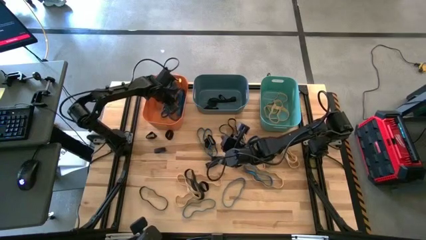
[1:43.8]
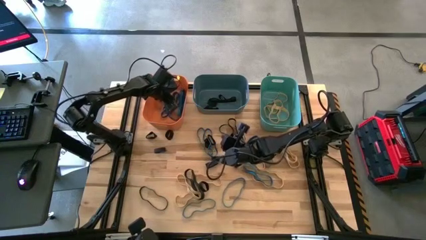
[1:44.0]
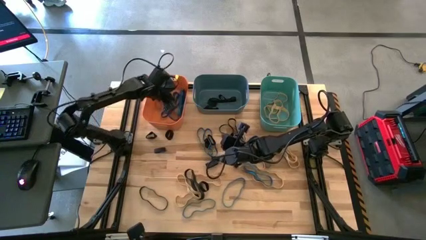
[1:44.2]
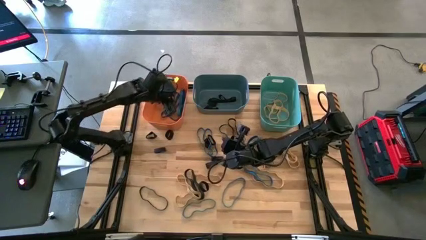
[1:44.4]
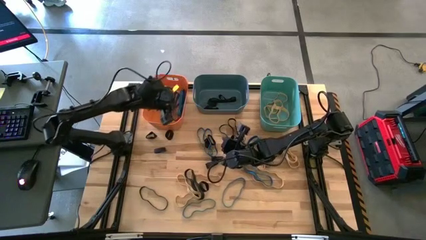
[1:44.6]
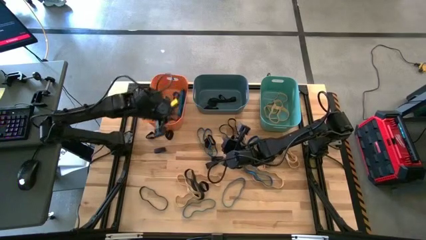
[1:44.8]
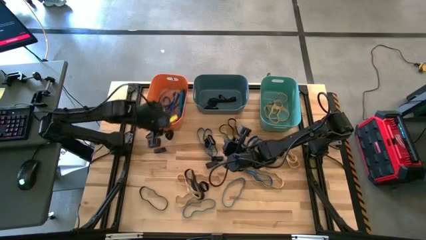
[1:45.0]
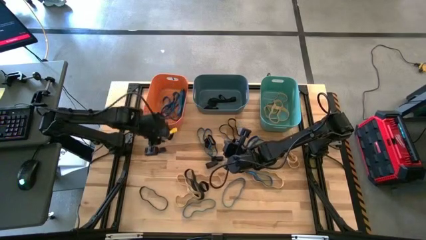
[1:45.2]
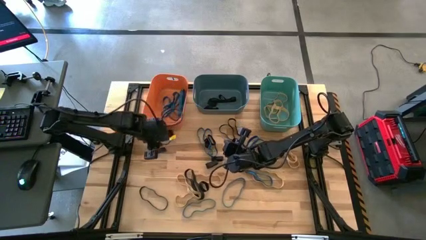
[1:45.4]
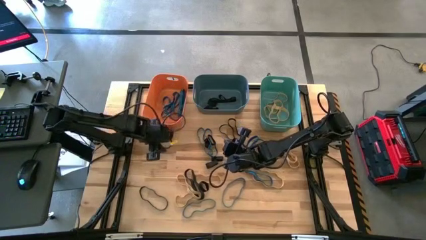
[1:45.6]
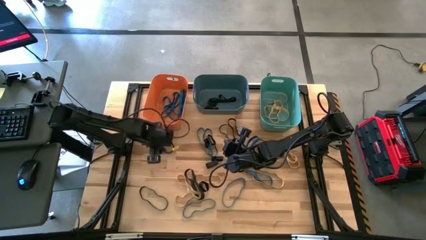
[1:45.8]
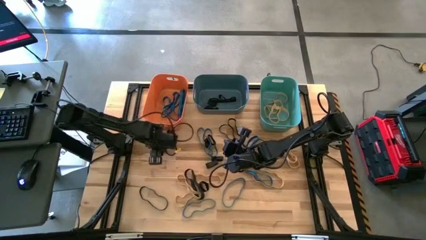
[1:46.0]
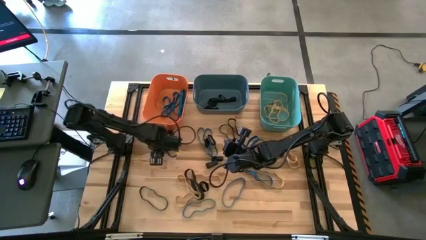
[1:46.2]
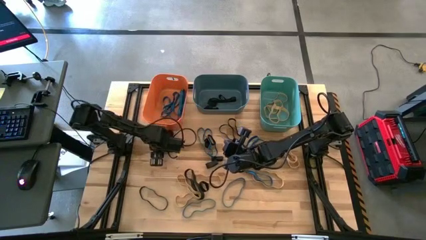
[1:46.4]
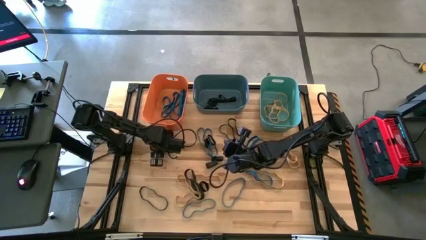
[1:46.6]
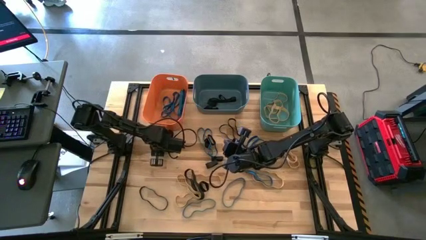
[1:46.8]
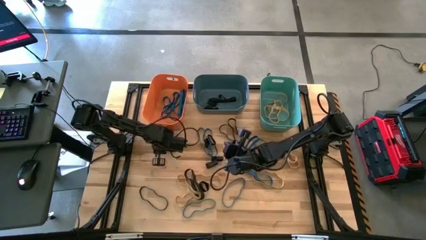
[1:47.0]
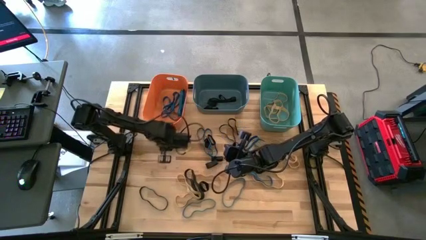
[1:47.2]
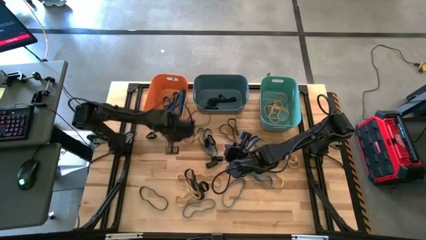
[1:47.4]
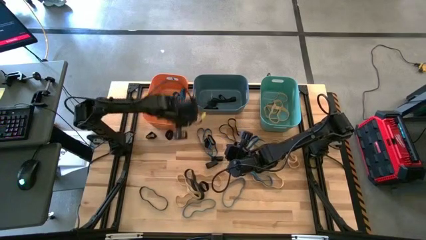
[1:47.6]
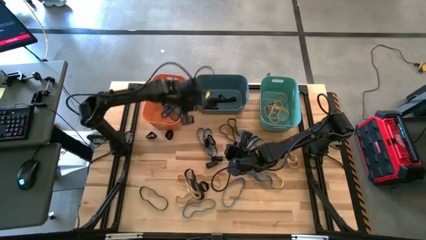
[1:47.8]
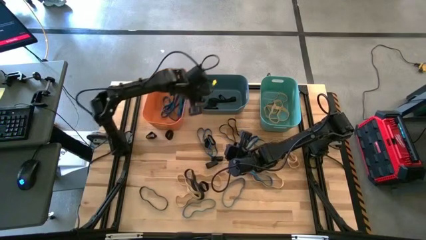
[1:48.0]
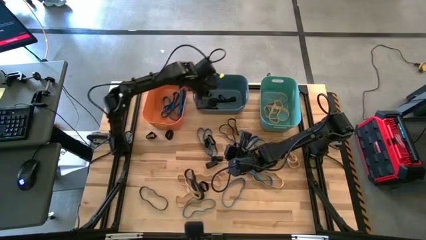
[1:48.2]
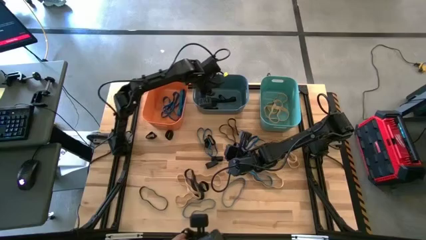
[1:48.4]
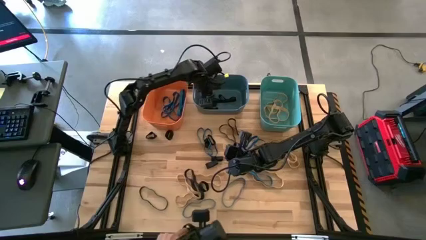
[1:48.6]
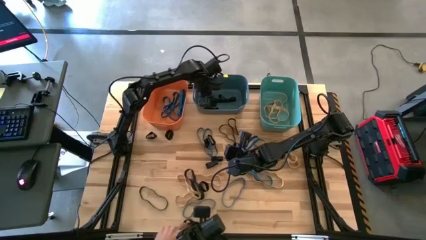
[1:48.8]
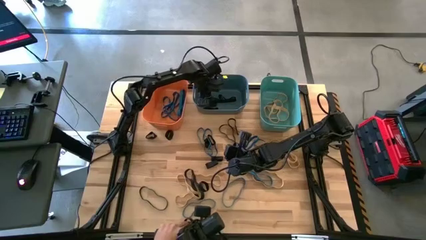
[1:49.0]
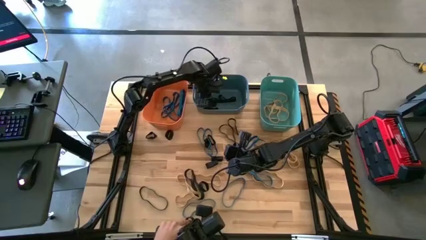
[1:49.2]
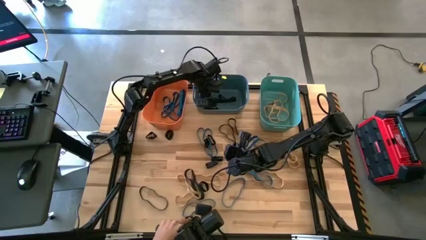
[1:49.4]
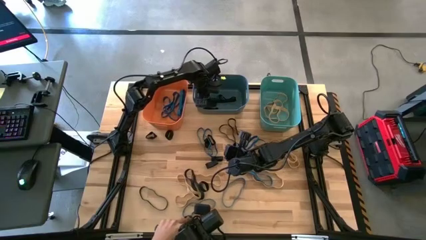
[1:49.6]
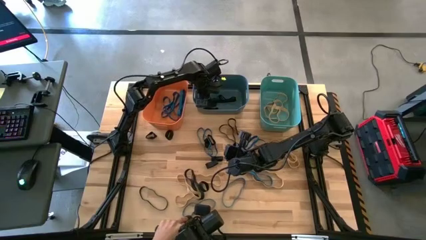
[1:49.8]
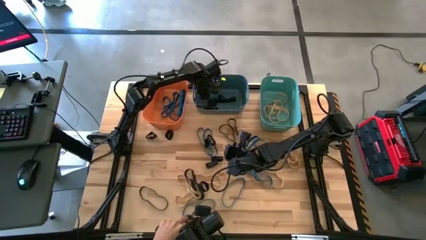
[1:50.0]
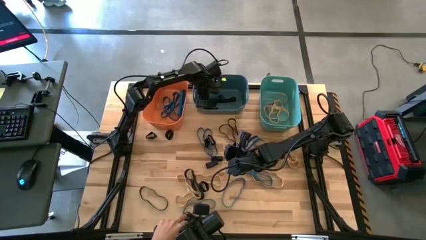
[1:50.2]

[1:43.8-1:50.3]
Task: Sort rubber bands into baskets
Put the black rubber band into the blue bin

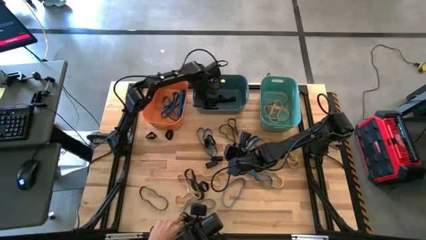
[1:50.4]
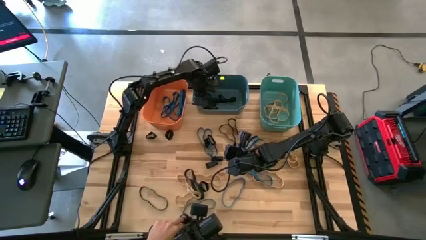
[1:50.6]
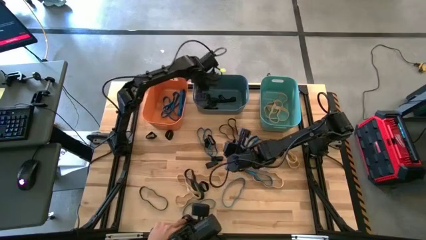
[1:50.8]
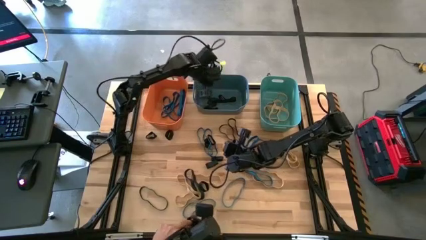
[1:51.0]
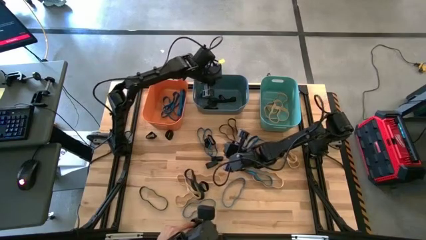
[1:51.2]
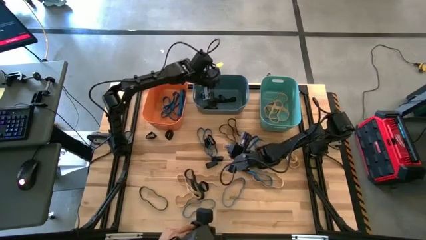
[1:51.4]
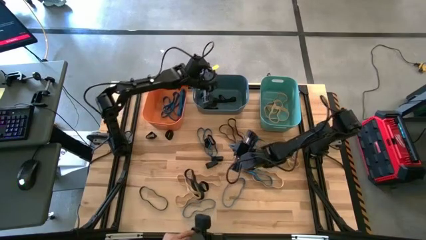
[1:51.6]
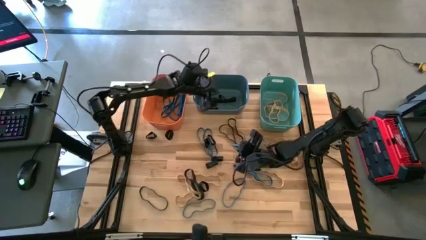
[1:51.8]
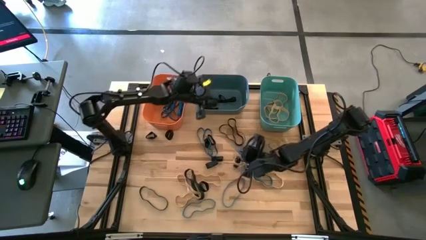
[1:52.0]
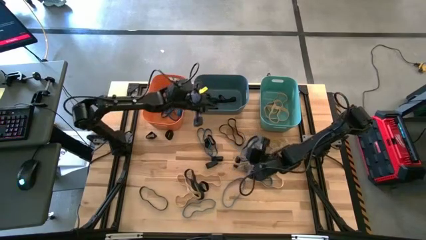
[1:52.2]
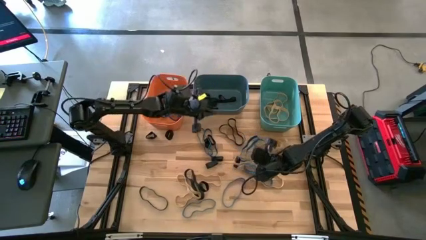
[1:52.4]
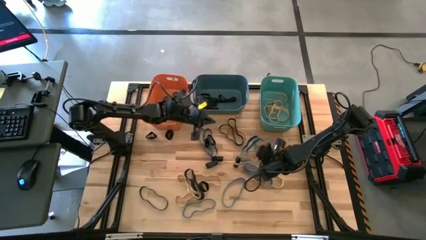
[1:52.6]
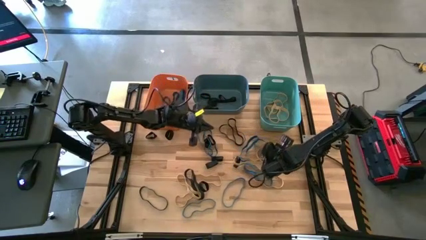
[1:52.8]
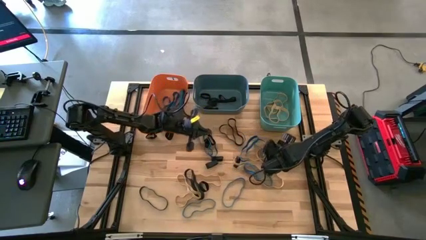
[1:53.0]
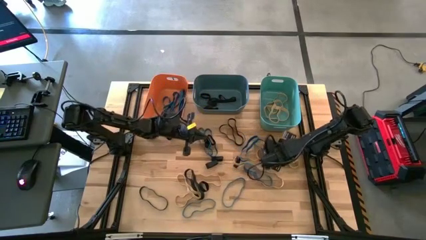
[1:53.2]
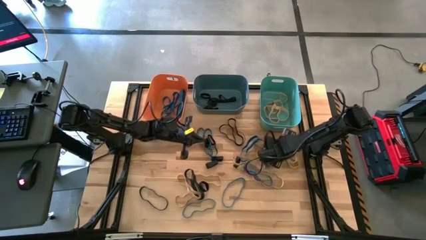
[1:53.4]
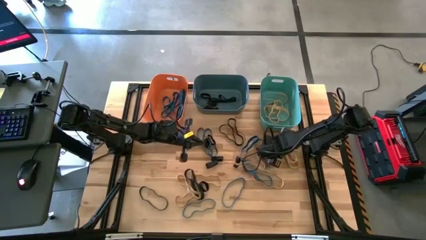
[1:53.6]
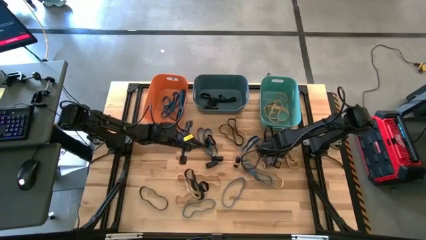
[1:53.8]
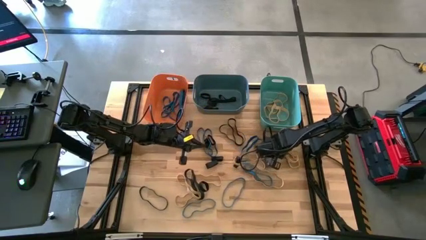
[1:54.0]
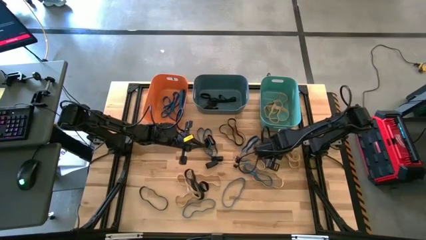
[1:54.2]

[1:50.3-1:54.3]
Put the brown rubber band into the green bin

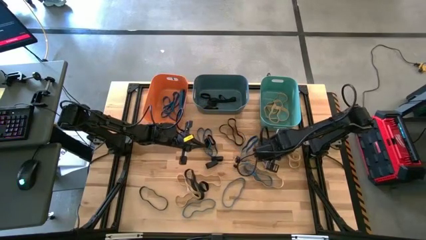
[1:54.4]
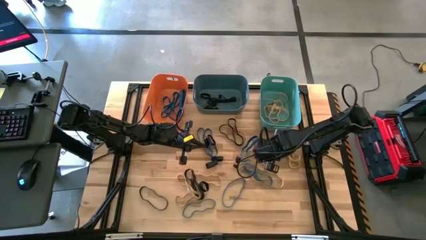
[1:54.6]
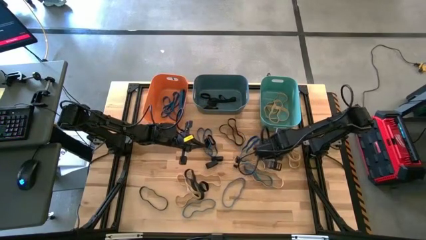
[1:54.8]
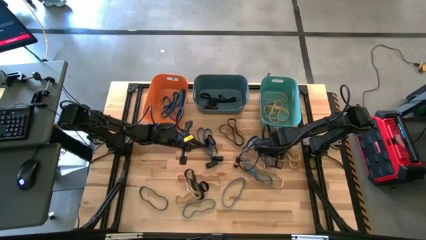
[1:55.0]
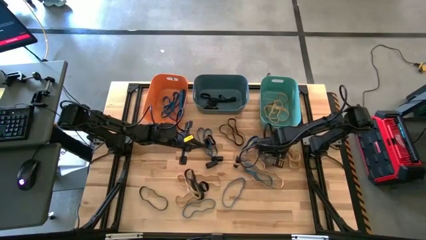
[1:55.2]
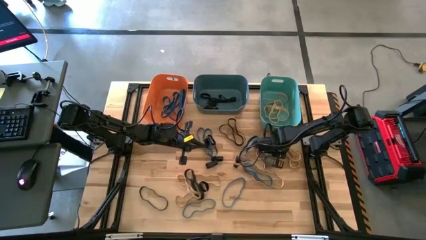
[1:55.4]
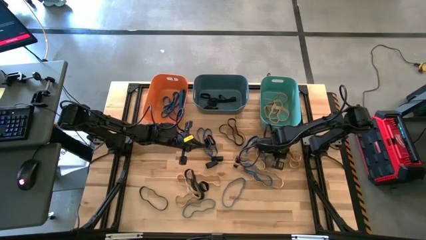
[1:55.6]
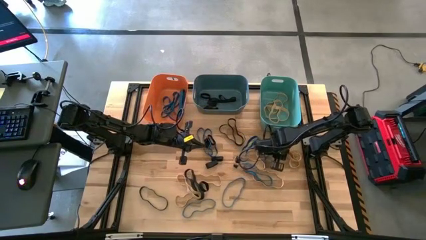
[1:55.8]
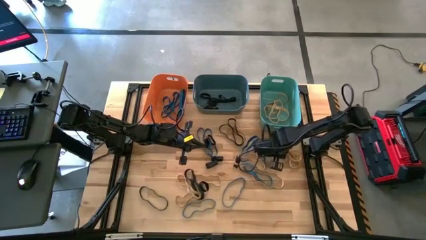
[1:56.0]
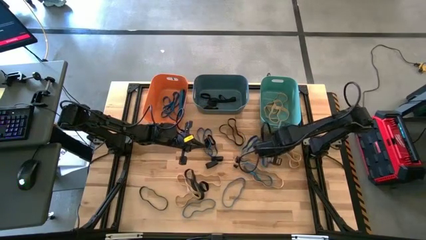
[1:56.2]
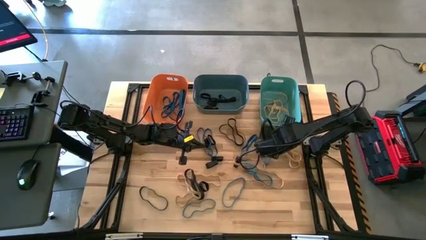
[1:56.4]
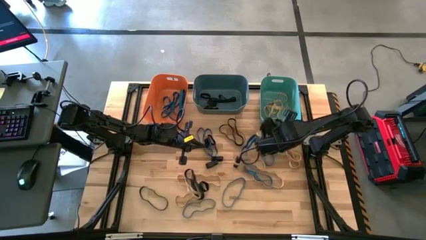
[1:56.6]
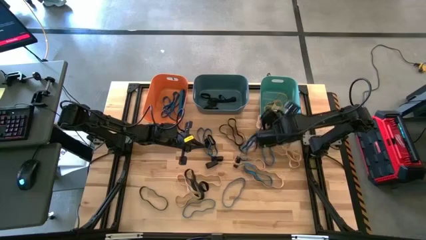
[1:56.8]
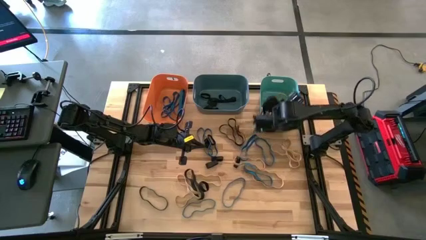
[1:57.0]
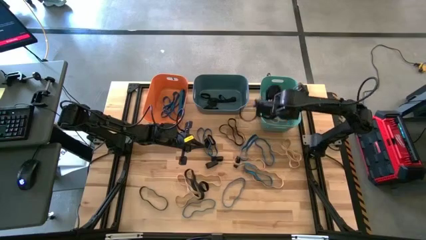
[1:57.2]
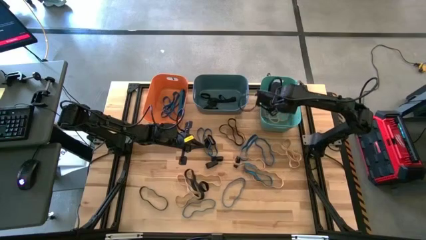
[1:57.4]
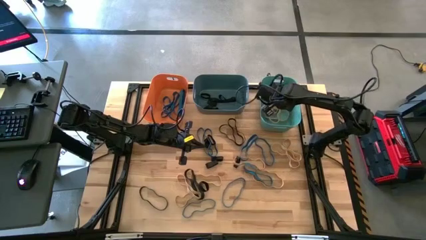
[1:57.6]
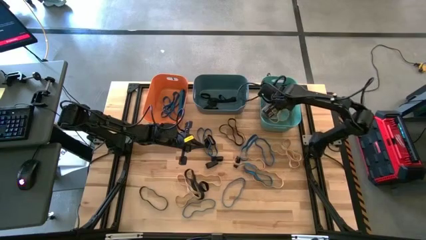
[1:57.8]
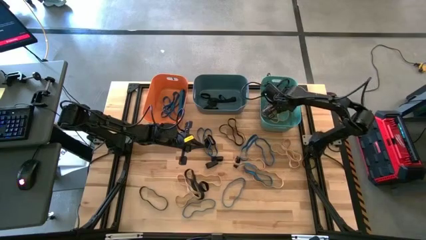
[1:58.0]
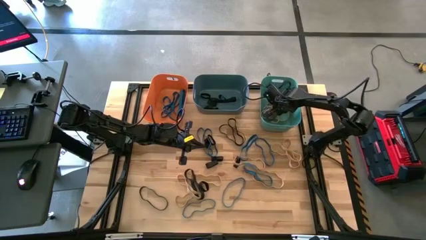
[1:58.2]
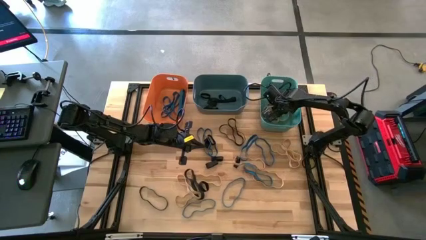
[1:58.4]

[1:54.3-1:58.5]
Put the brown rubber band into the green bin

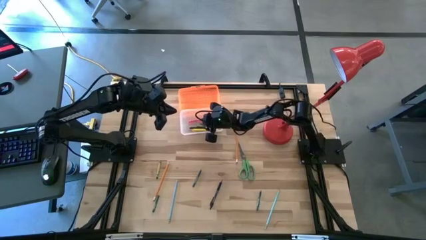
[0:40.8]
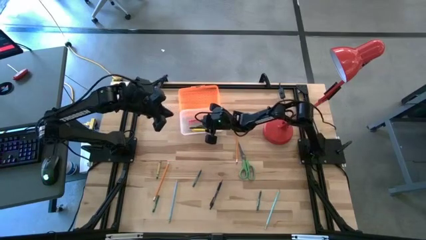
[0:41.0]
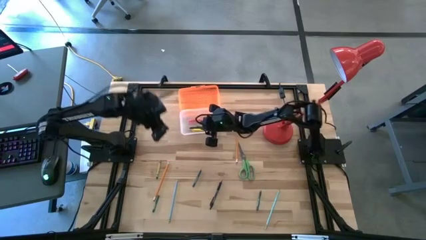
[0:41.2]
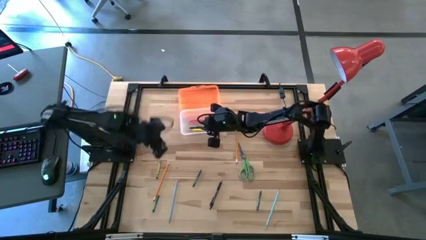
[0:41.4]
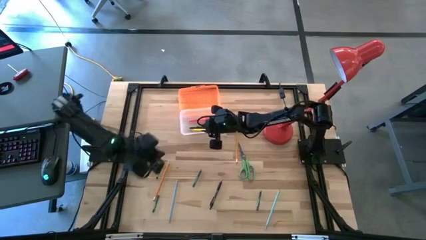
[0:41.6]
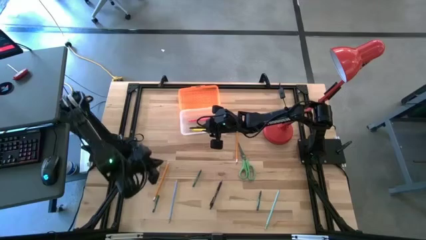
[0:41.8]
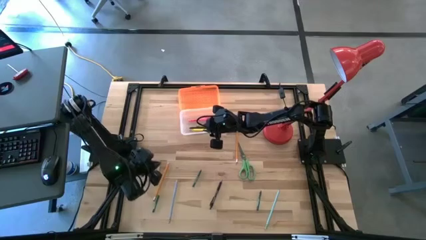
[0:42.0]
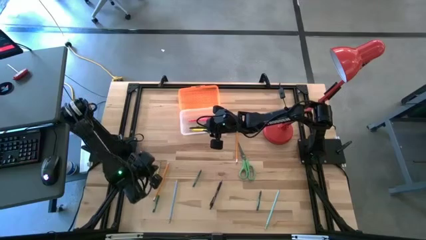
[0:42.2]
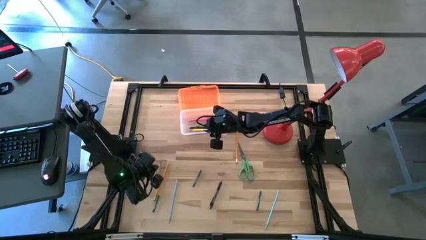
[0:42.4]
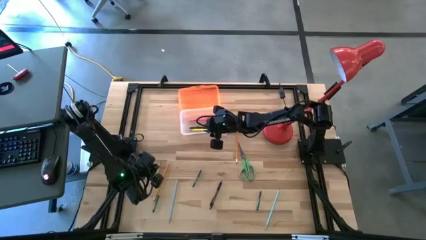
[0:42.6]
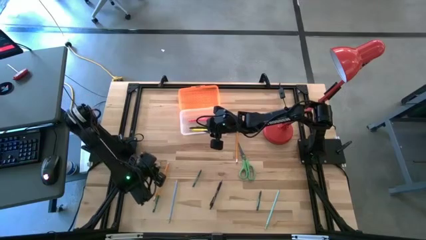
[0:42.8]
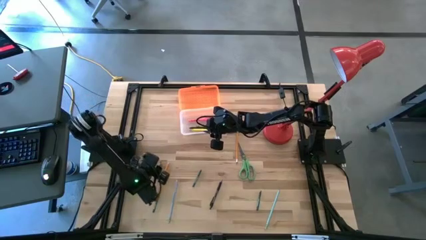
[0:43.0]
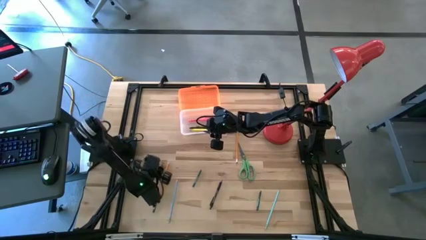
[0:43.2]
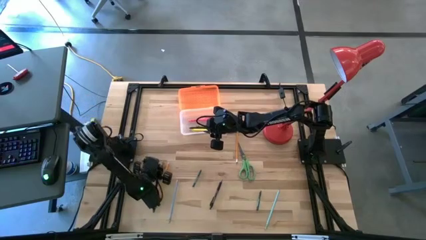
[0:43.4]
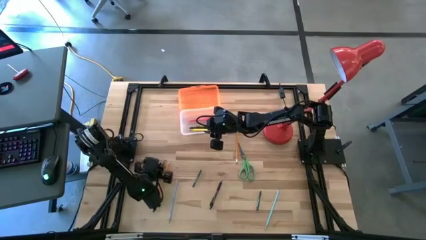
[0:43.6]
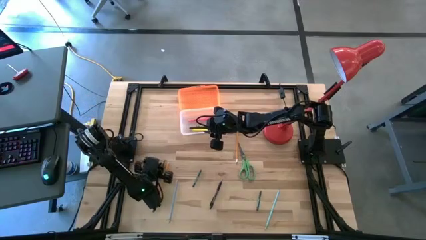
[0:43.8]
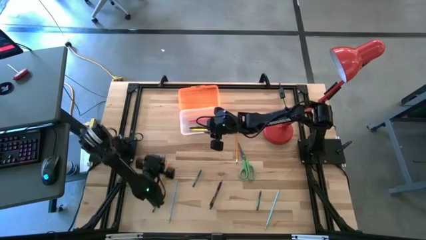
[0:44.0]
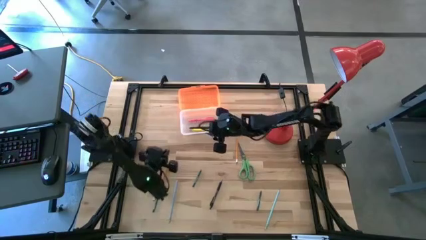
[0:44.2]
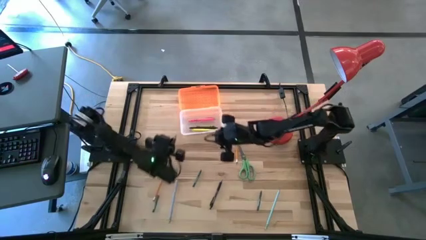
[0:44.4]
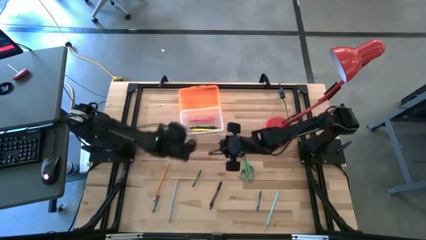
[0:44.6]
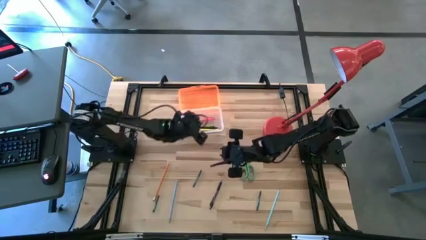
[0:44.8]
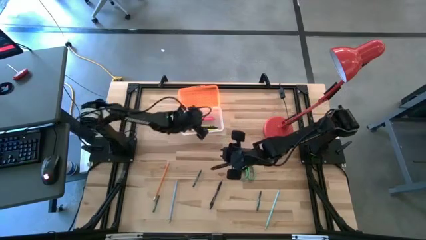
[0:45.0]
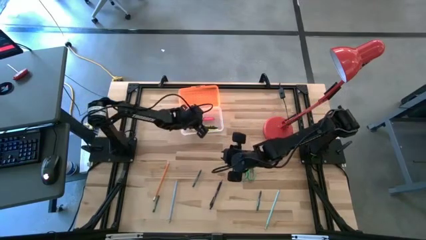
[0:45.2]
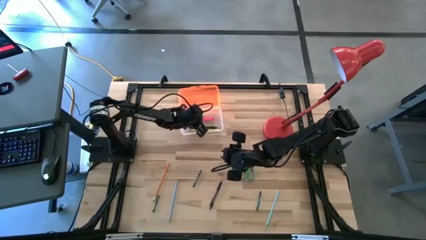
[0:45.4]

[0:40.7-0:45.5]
Task: Pick & place school supplies into a supply box
Put the green crayon into the orange supply box
